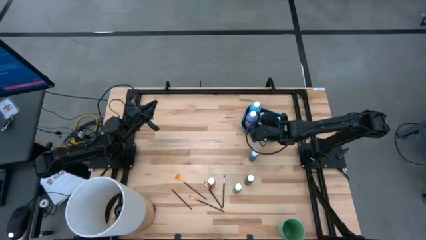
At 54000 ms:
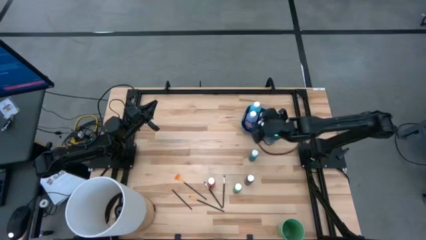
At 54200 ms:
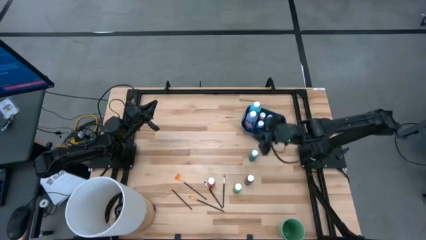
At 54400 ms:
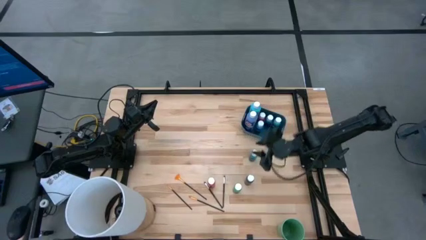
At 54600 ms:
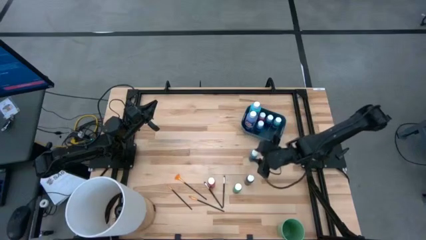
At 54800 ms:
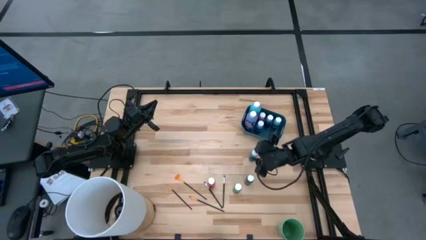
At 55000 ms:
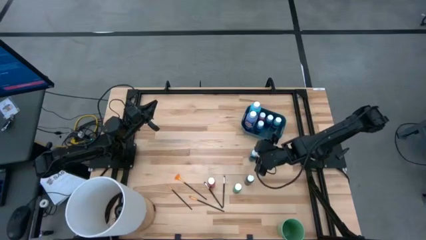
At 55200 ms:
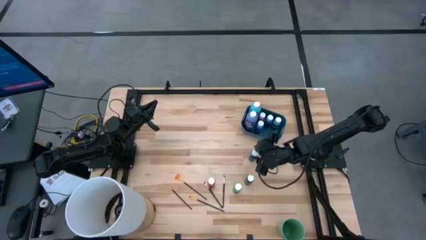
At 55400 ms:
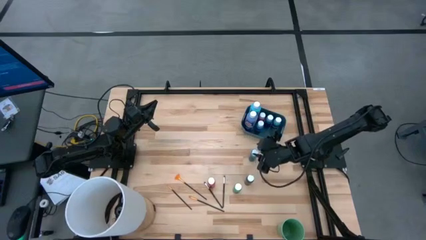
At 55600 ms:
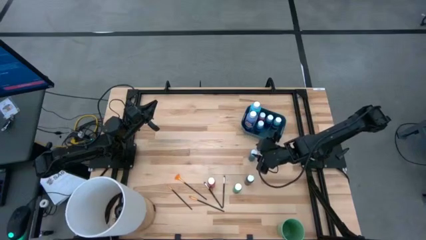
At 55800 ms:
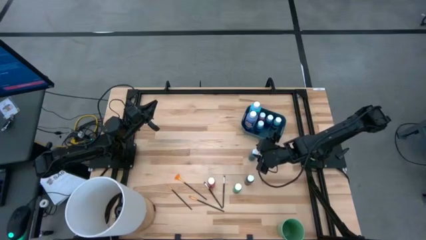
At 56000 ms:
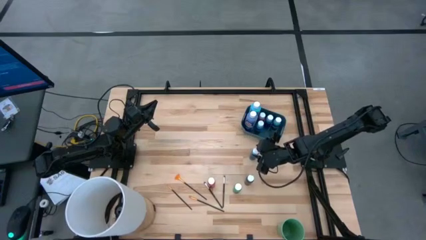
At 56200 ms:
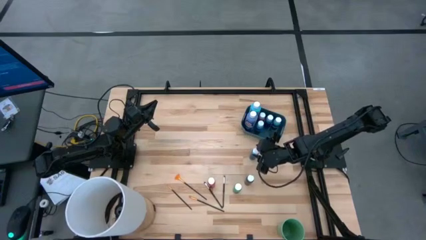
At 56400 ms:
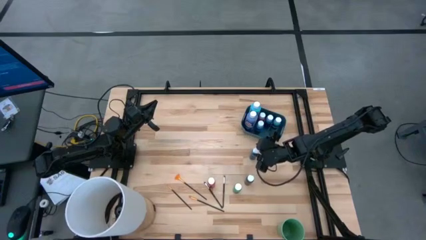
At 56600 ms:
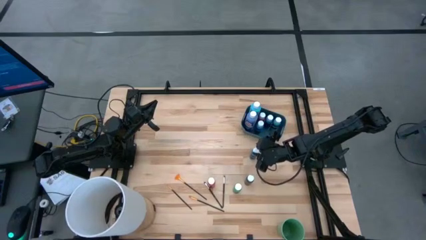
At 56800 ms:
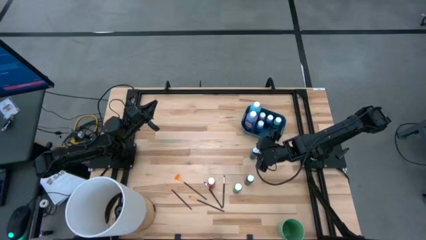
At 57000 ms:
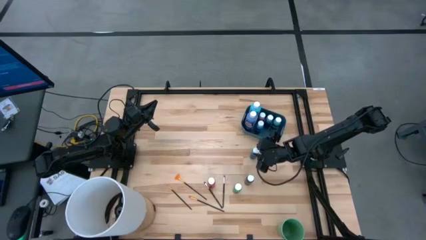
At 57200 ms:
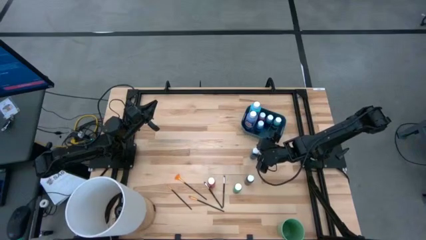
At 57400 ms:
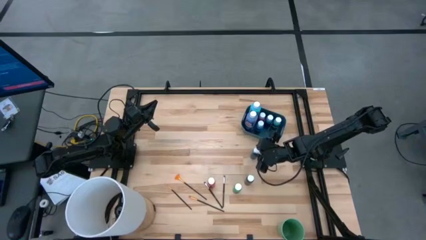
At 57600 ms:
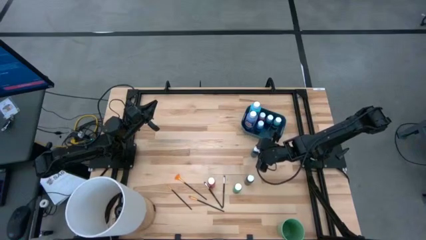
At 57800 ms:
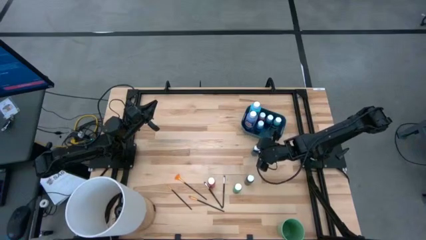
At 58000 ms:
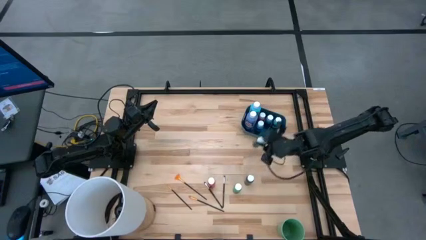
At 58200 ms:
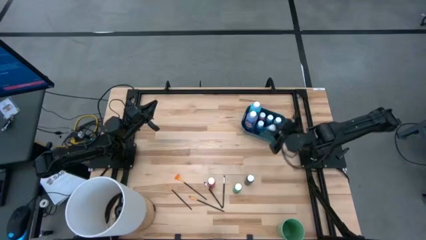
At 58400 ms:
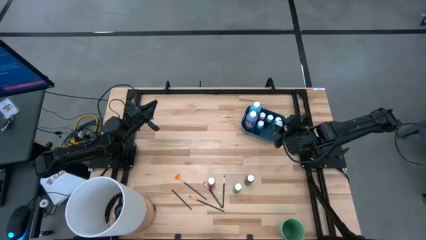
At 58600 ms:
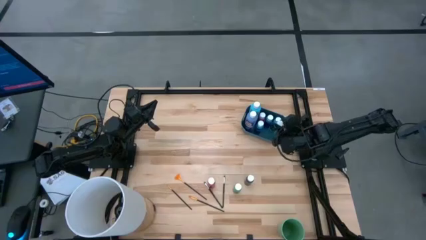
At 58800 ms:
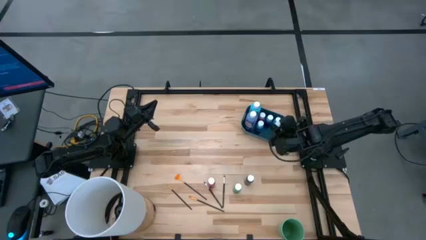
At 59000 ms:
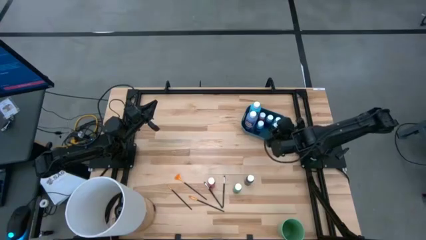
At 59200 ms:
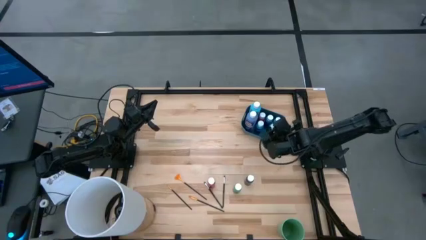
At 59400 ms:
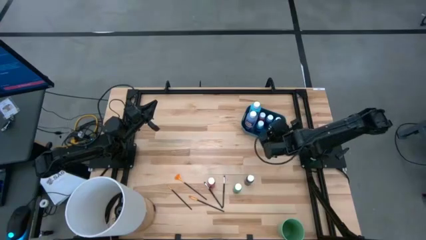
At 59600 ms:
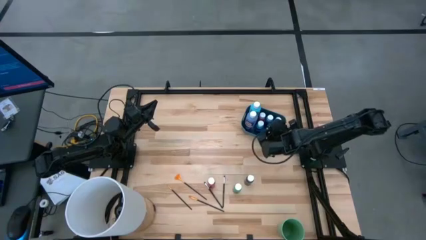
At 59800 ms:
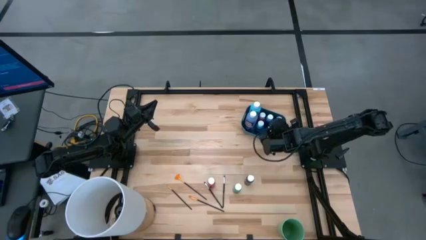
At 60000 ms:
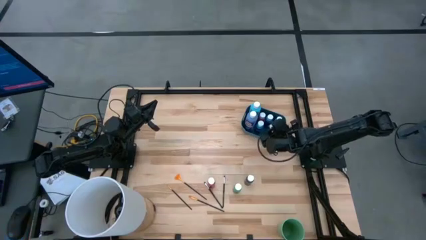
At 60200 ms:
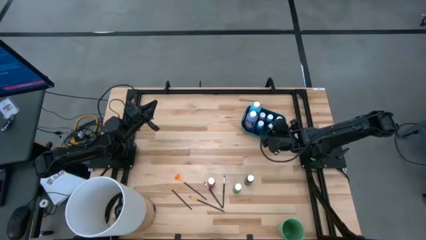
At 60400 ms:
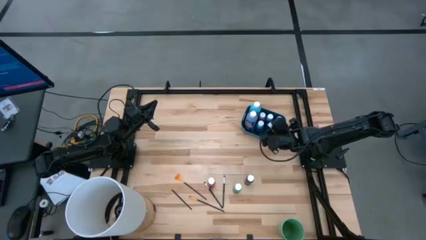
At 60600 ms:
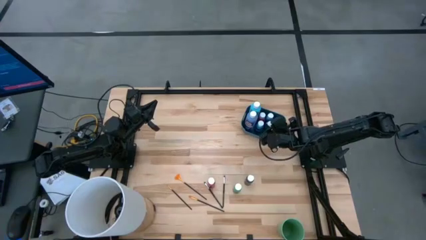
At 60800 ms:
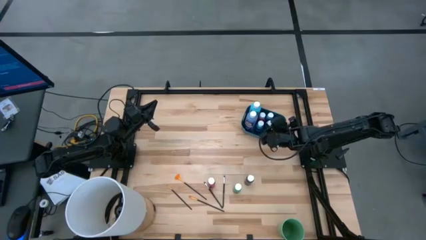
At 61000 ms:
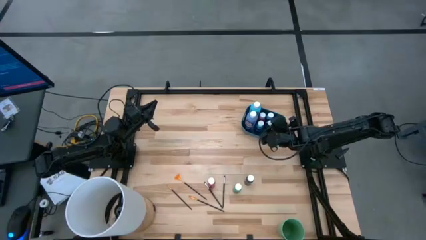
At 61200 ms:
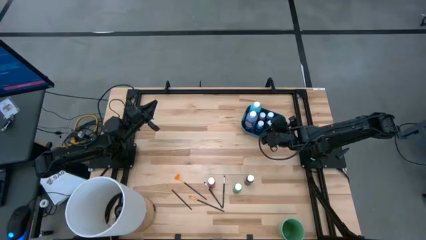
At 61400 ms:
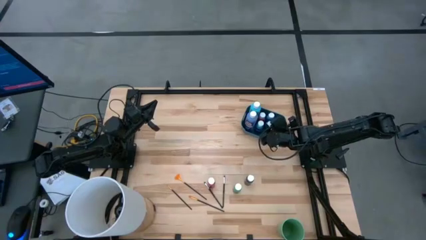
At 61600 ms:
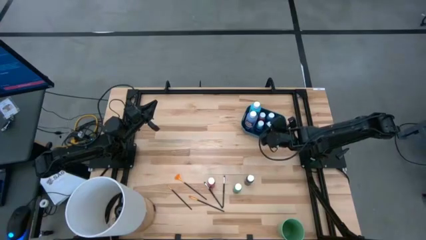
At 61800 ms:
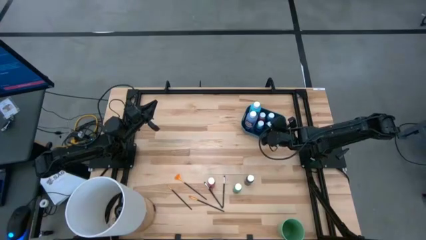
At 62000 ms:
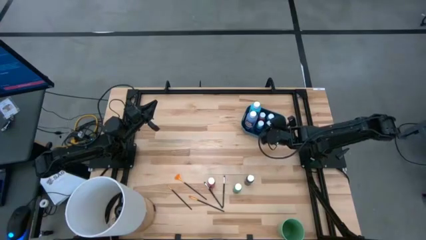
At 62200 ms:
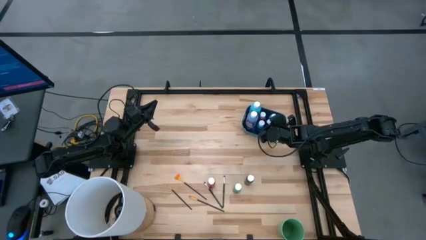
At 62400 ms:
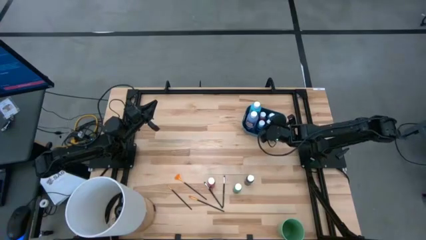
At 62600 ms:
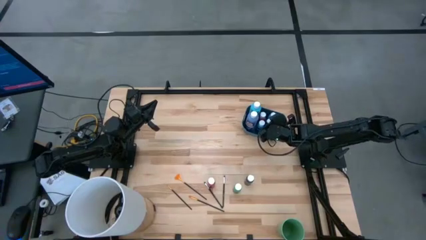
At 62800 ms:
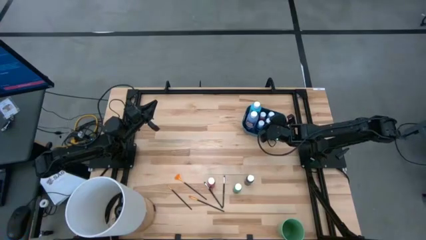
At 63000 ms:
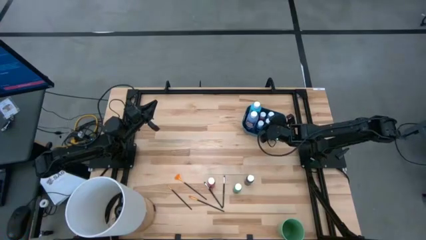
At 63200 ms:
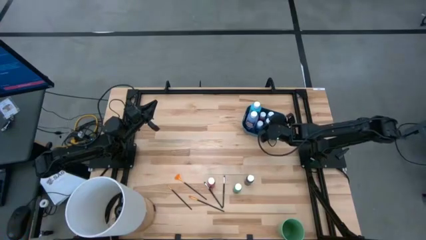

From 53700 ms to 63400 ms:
Task: Pick & Place Paint Supplies
Put the small light green paint bottle into the blue bin

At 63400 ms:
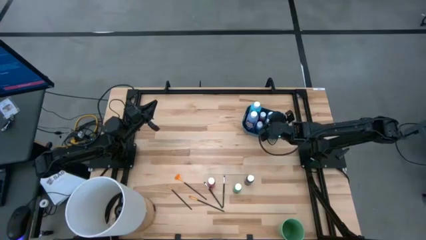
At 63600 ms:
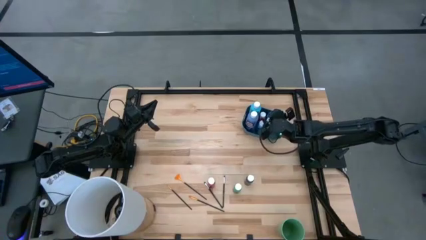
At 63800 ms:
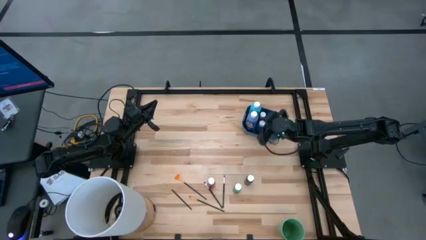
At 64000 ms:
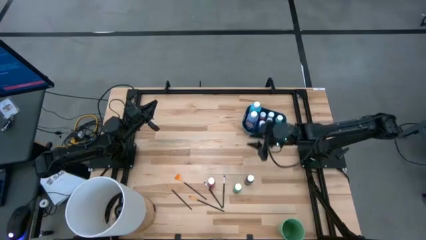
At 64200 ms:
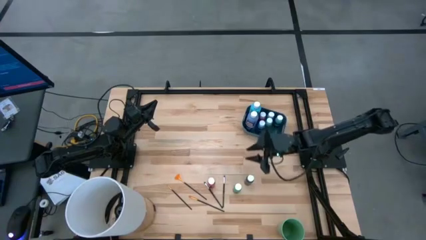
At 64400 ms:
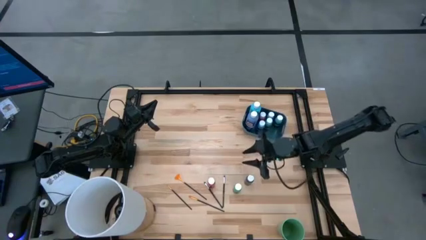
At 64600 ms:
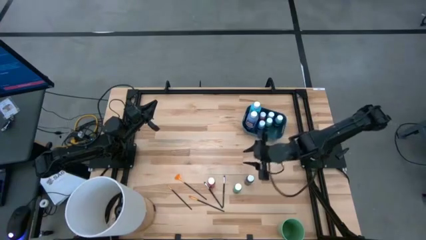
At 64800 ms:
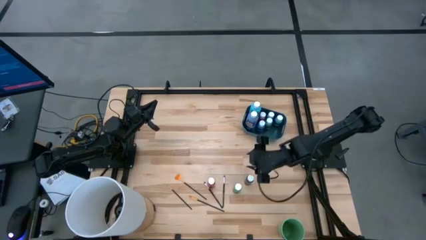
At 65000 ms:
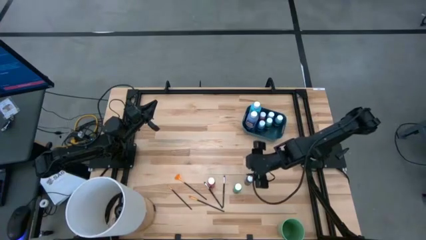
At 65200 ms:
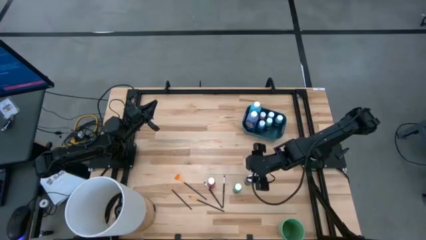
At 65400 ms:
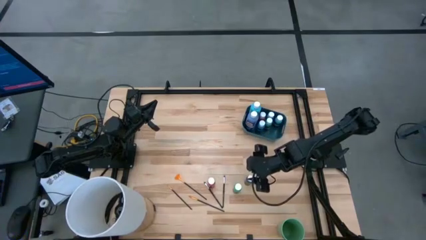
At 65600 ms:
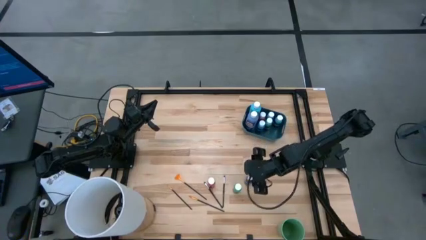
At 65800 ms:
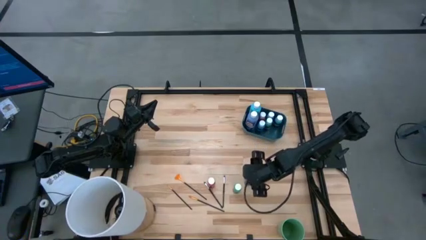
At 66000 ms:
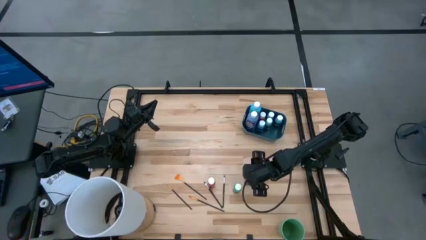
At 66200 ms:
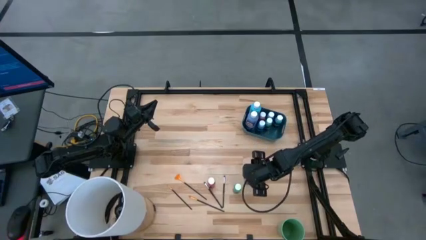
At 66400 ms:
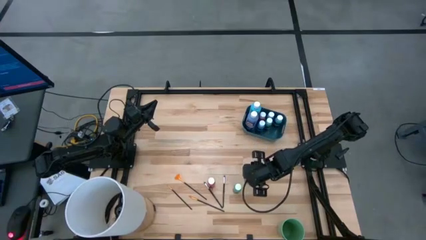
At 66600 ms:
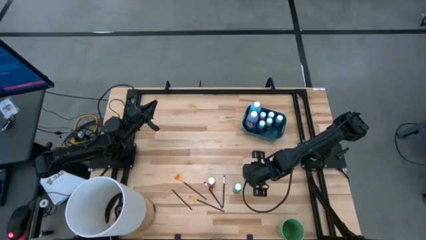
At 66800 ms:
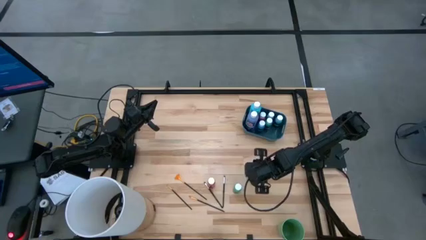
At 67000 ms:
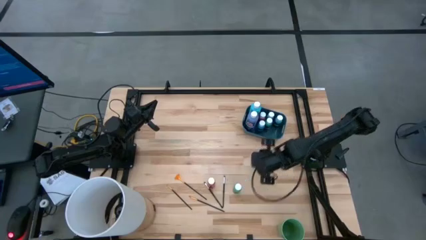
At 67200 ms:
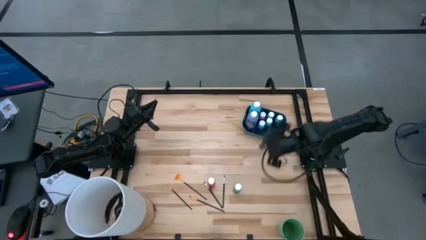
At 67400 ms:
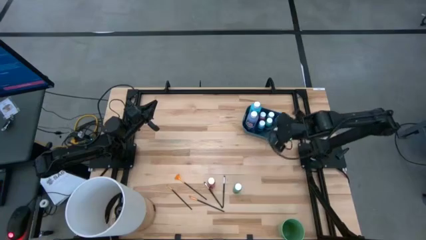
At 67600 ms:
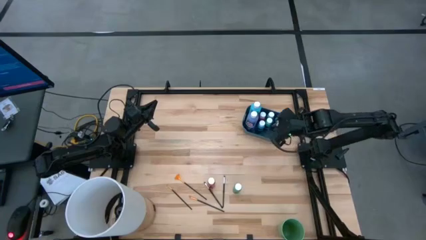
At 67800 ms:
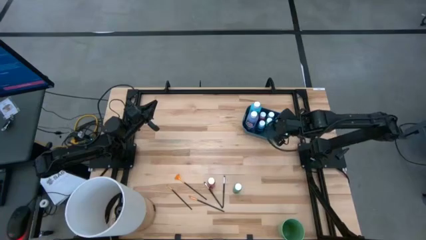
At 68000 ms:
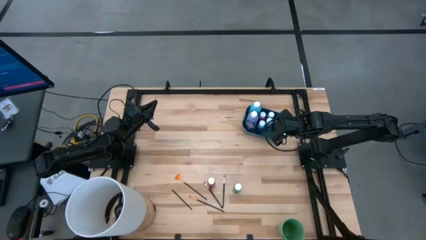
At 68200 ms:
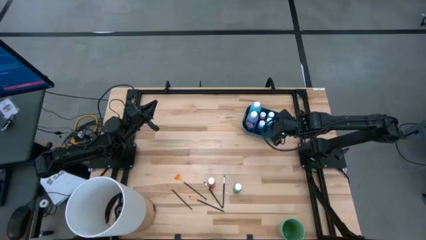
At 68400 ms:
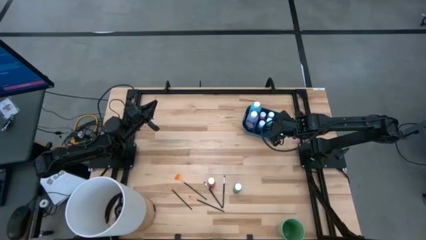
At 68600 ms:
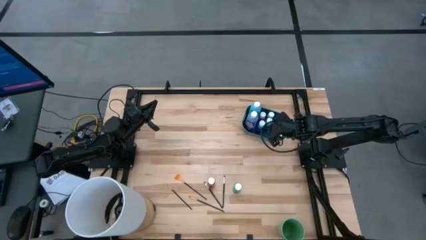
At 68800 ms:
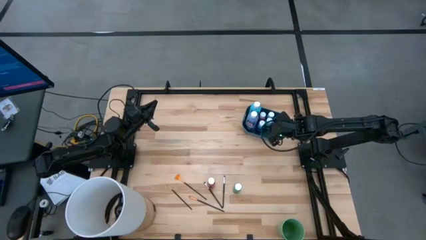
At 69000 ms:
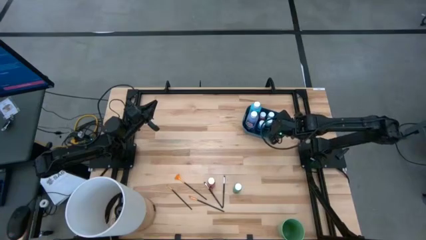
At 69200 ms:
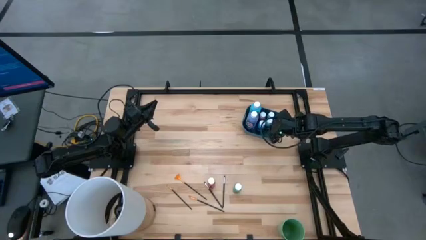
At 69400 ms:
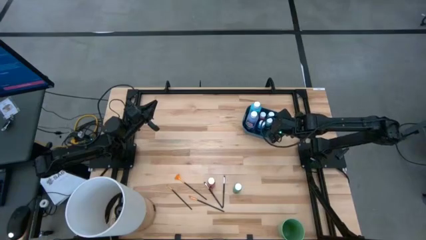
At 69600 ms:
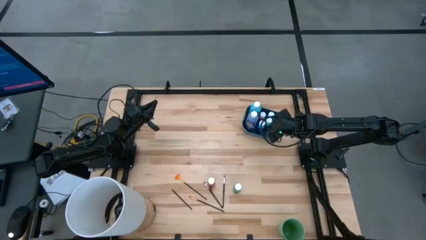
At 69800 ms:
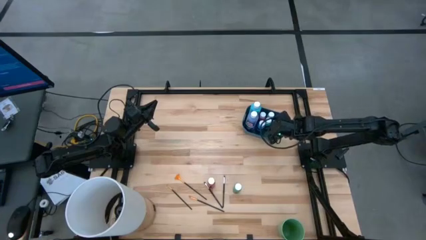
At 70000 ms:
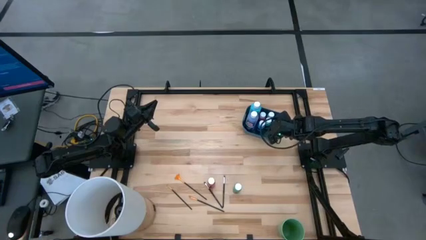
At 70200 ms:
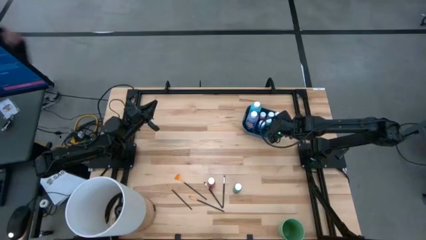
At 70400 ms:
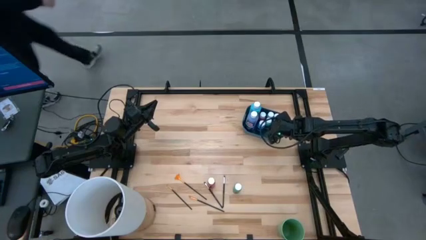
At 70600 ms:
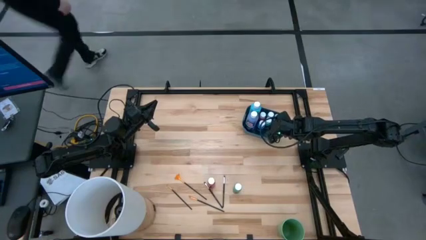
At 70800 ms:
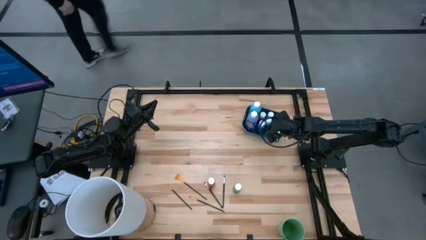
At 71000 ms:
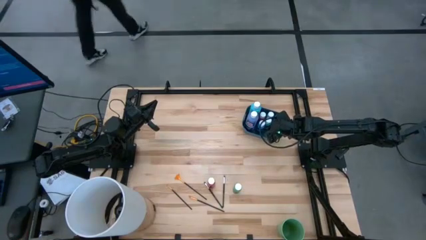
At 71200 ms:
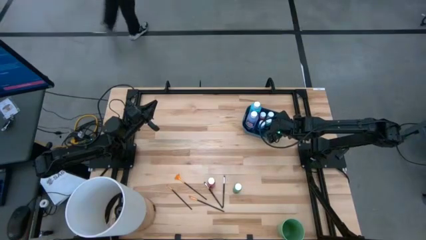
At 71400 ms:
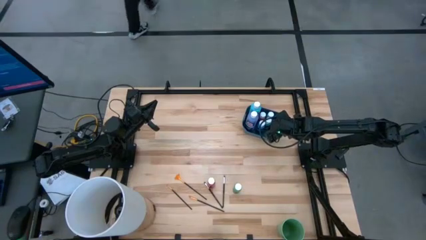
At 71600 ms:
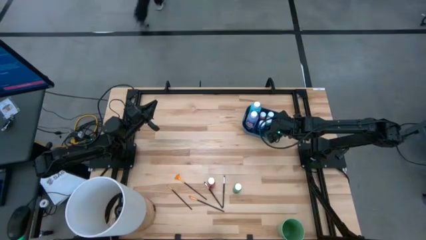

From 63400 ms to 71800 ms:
Put the small black paint bottle into the blue bin
